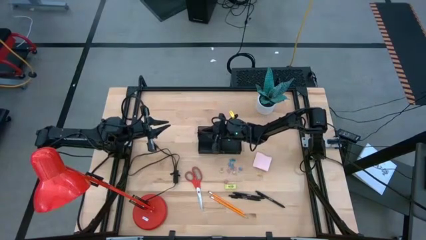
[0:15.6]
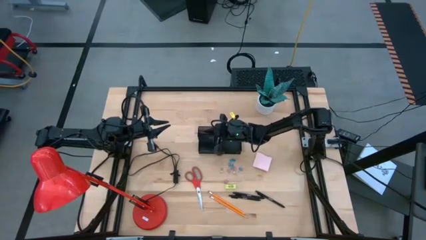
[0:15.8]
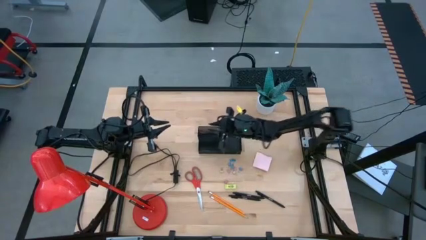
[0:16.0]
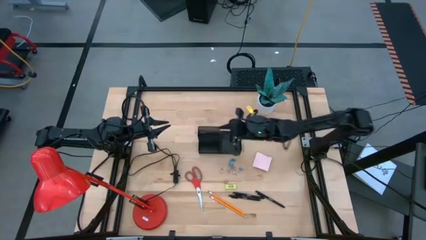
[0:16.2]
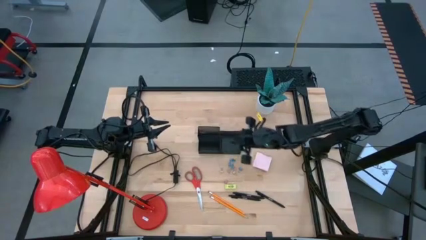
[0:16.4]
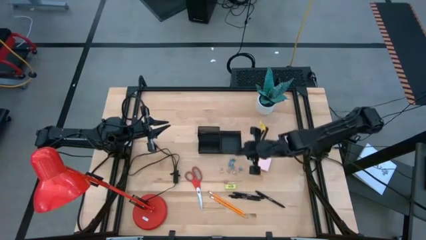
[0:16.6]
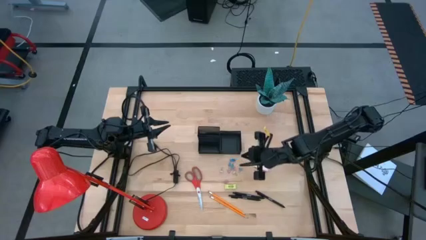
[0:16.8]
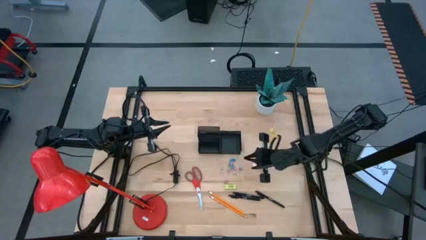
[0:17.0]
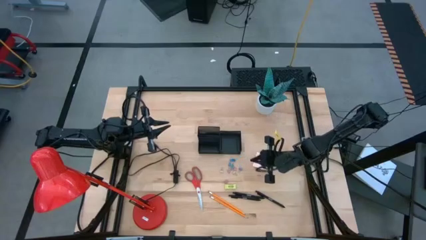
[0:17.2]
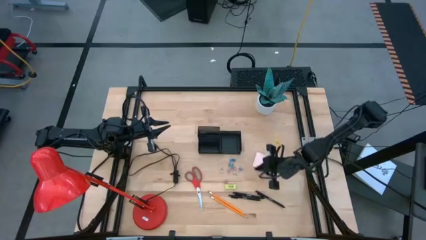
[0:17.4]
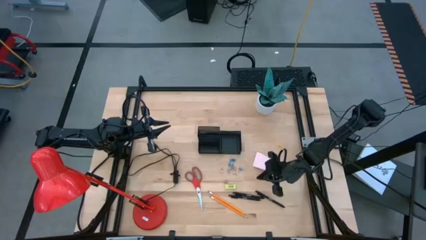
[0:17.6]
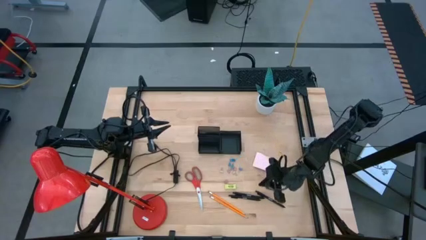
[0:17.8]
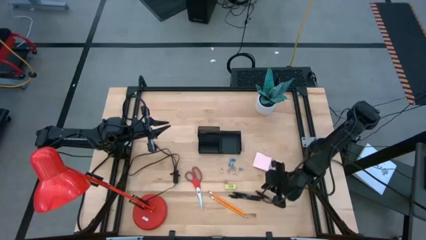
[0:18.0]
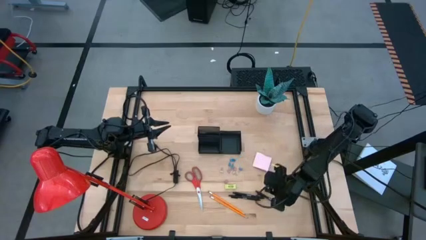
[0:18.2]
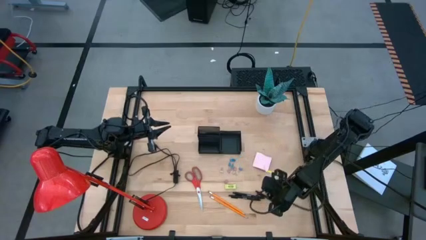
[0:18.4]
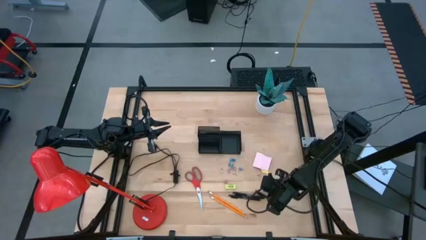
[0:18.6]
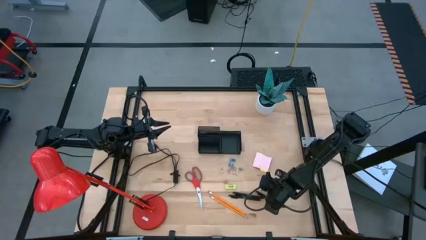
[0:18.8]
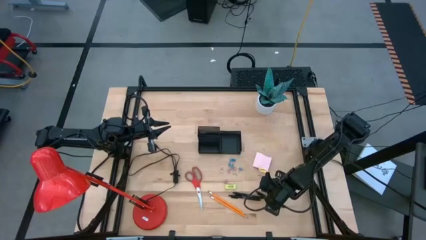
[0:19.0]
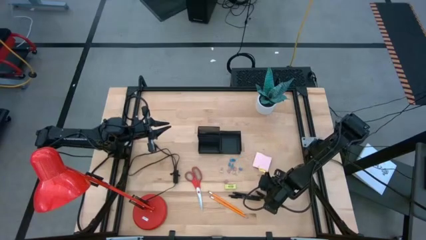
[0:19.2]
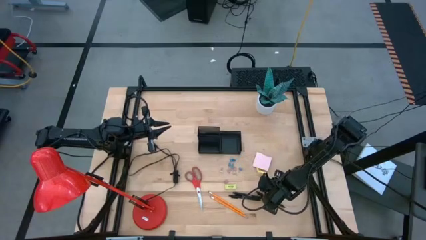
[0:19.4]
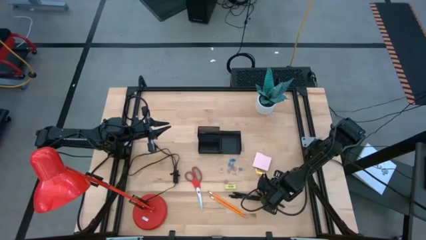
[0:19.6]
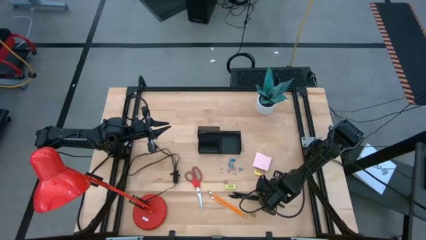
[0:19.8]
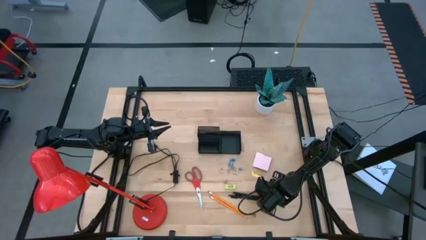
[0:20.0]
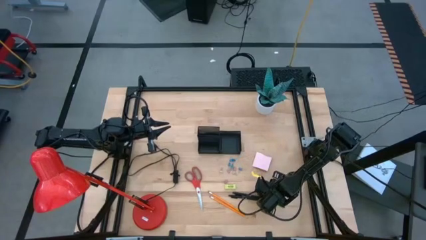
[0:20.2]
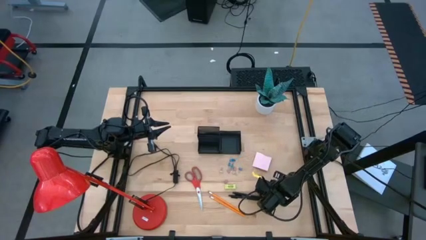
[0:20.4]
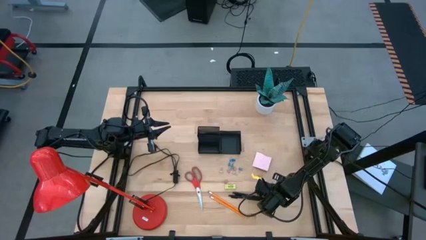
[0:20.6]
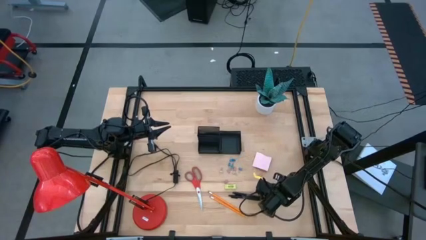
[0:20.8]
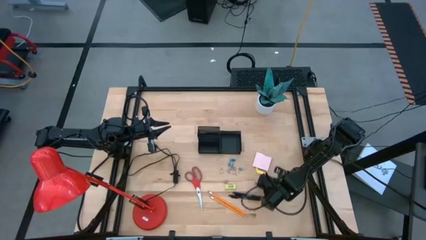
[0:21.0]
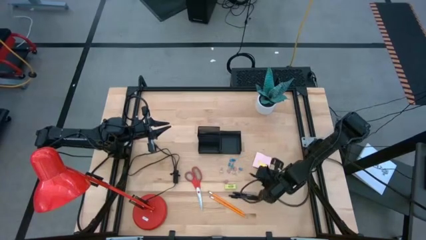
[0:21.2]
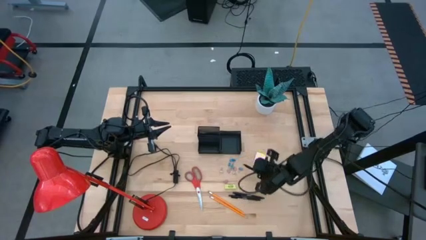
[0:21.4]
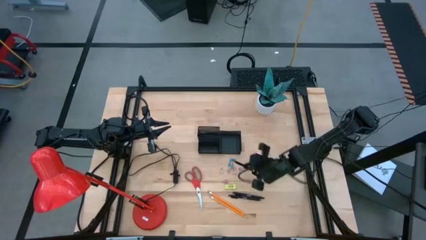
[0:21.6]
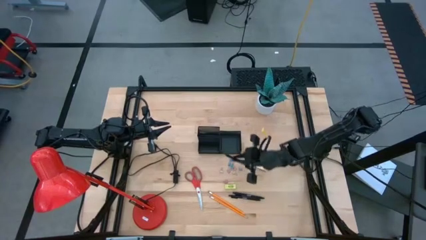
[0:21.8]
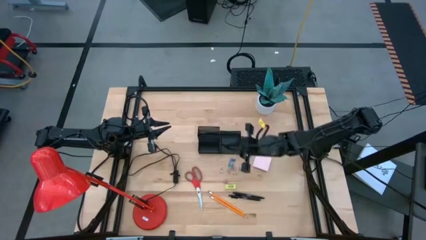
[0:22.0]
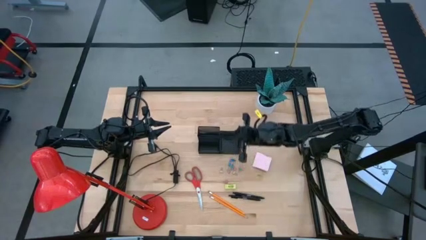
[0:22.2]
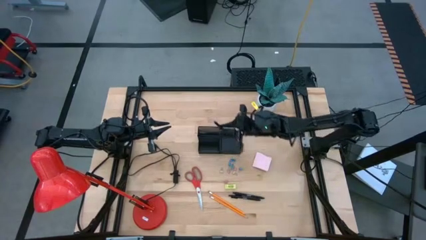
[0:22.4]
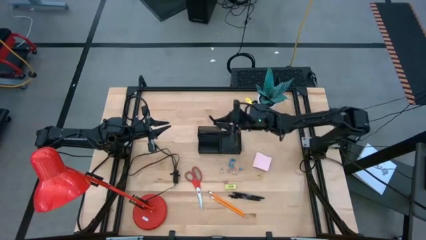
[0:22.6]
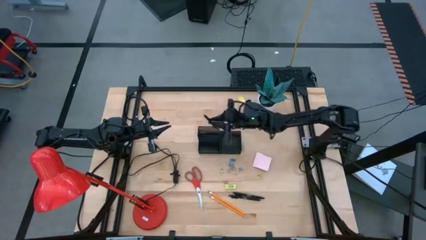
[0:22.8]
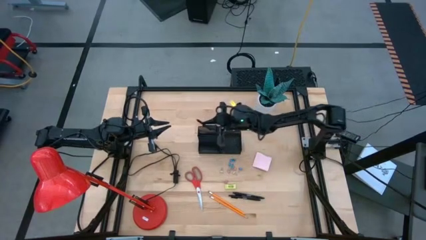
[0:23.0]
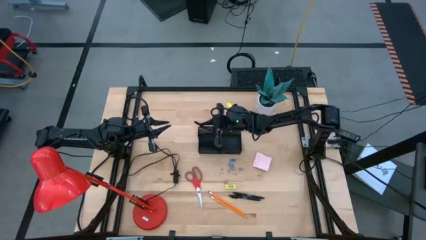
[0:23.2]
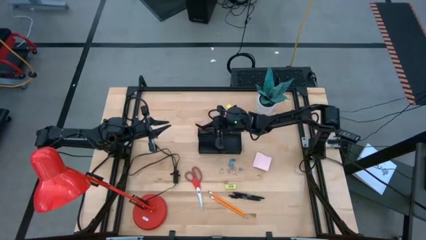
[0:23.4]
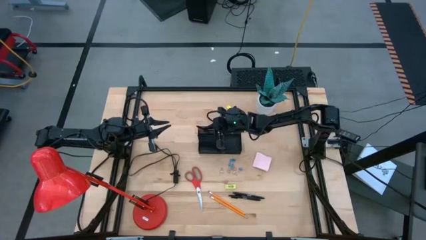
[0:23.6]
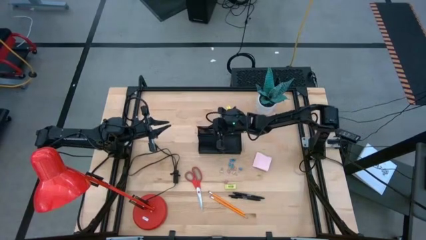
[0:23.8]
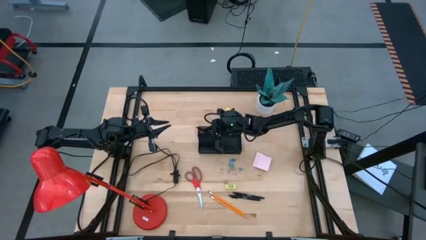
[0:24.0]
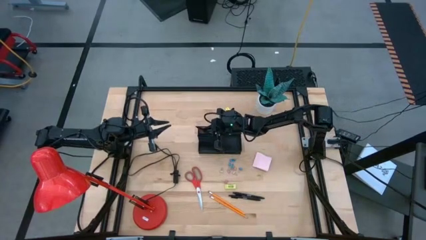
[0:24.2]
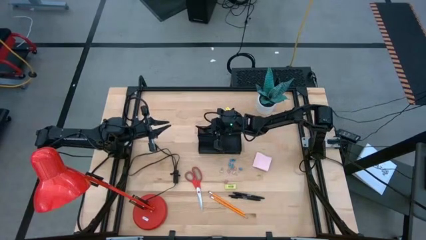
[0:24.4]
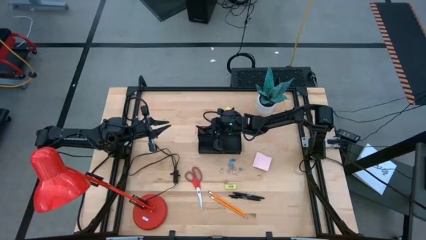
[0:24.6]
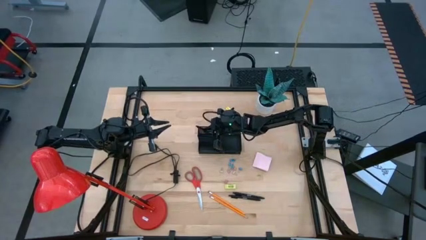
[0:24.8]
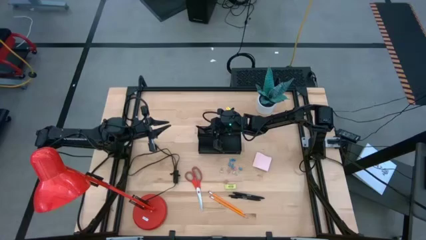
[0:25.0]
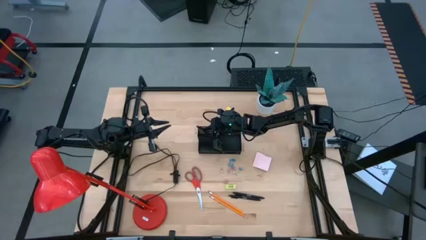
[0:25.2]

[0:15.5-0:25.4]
Task: Pick and place office supplies into organizer
Put the black pen into the black desk organizer

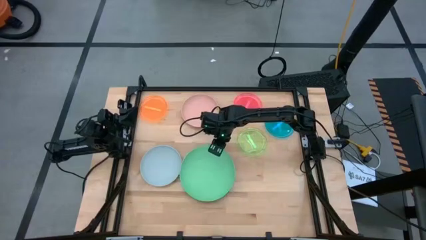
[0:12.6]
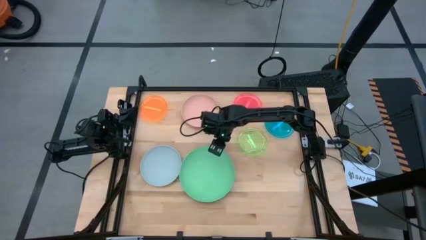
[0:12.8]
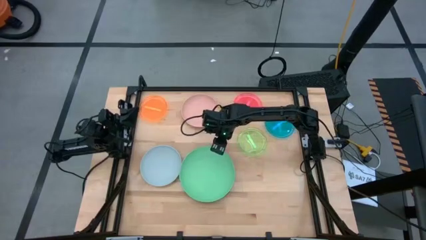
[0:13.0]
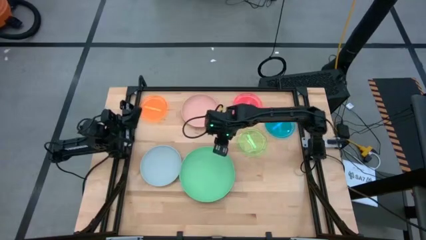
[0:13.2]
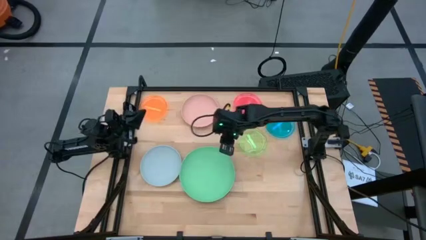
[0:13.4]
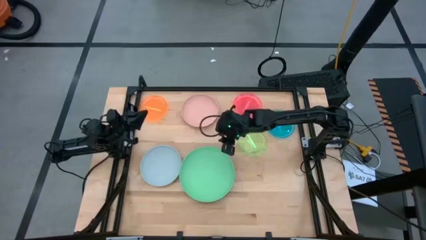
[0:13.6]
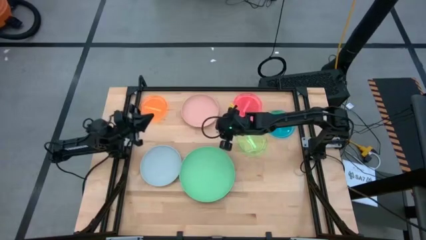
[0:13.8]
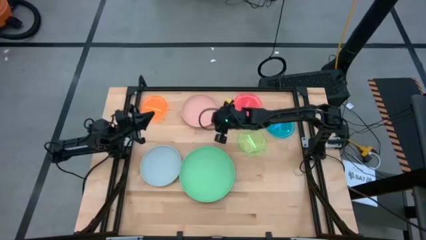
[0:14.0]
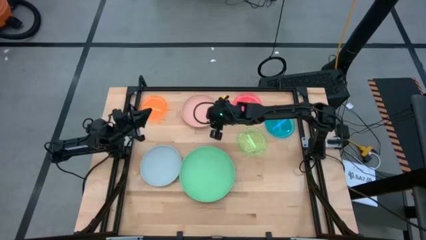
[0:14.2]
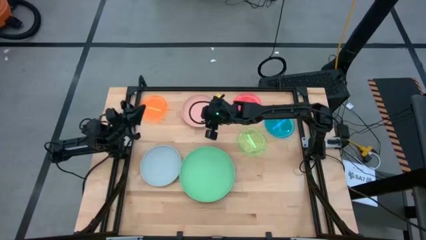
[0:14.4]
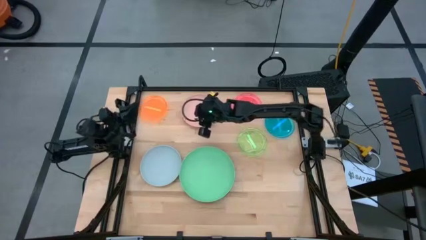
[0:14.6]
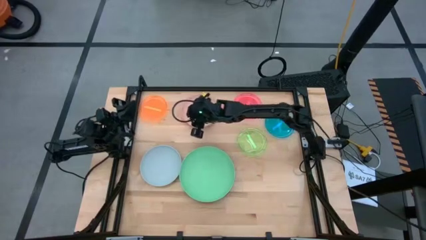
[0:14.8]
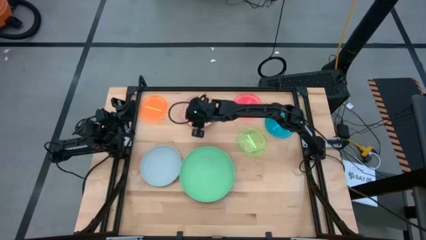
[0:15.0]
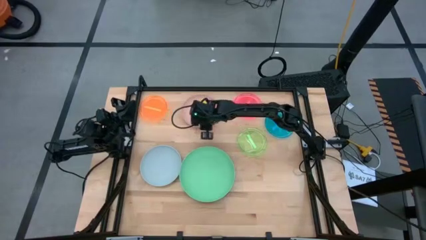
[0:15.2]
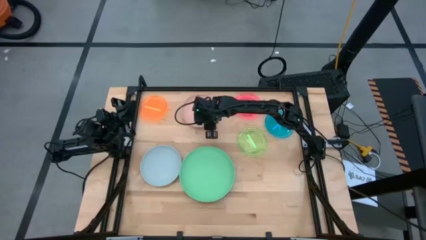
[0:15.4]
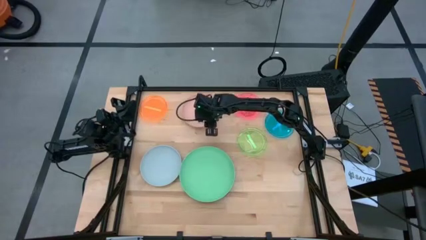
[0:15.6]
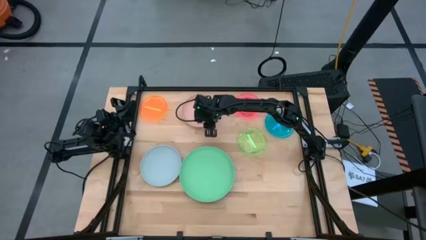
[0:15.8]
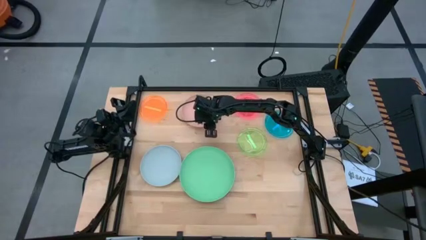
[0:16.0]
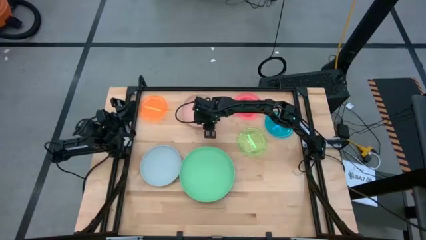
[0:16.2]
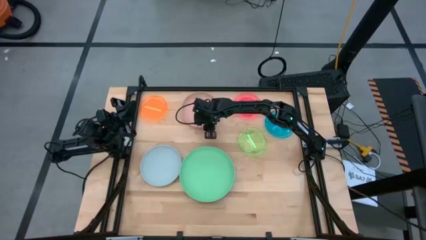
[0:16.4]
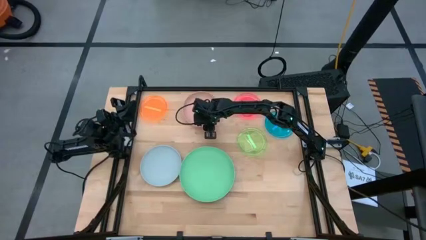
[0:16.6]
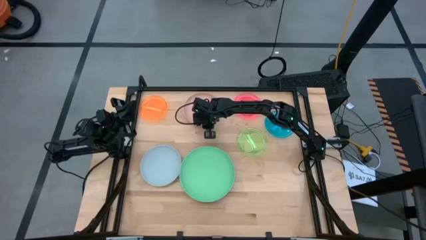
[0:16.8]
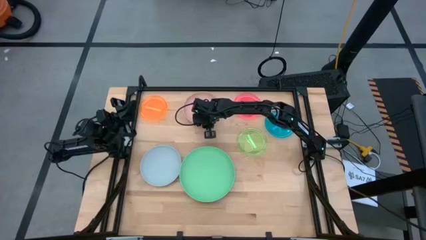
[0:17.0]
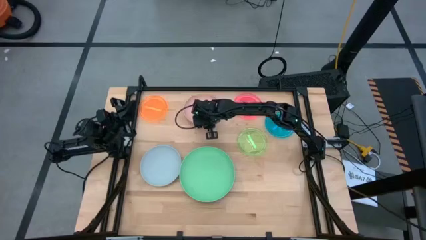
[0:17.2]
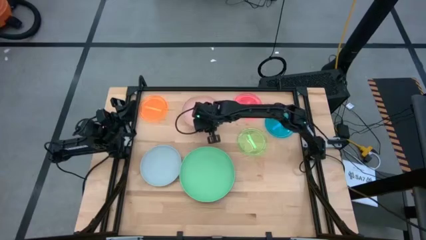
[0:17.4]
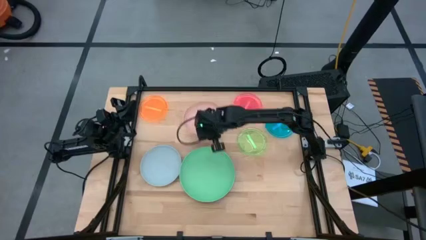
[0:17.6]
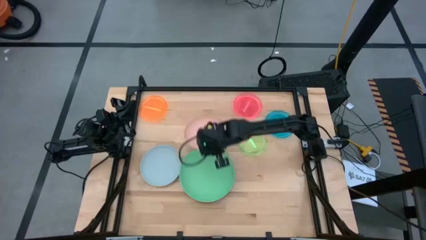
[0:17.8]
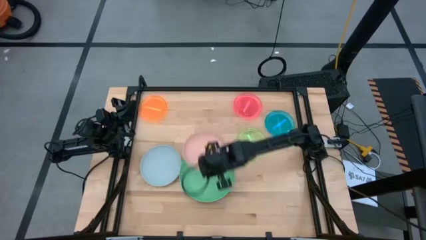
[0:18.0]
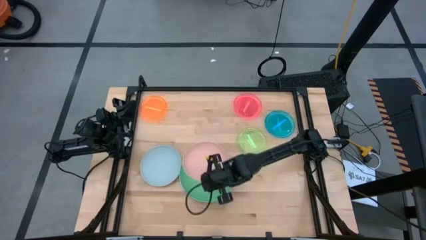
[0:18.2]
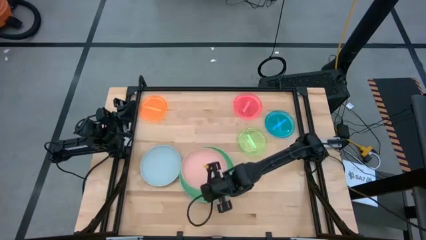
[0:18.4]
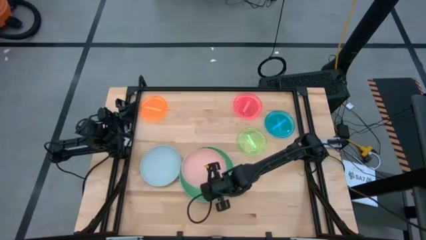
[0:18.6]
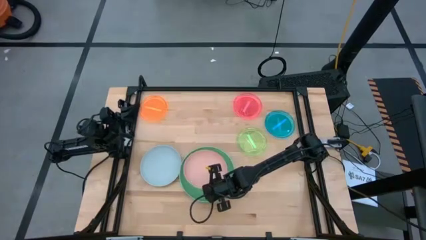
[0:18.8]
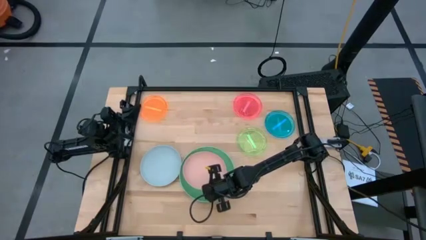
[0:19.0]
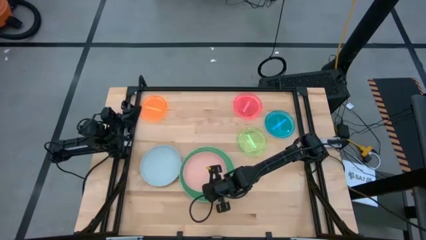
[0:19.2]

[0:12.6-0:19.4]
Task: Stack plastic plates
Stack the large pink plate on the large light green plate
